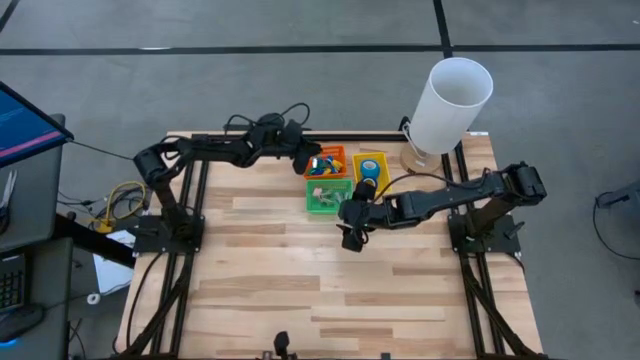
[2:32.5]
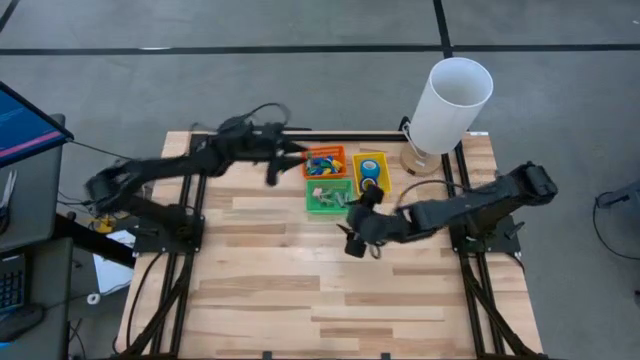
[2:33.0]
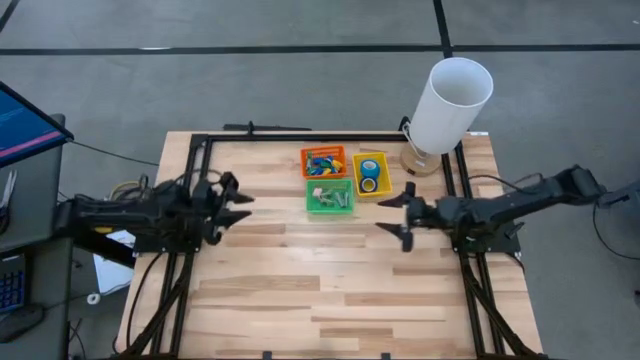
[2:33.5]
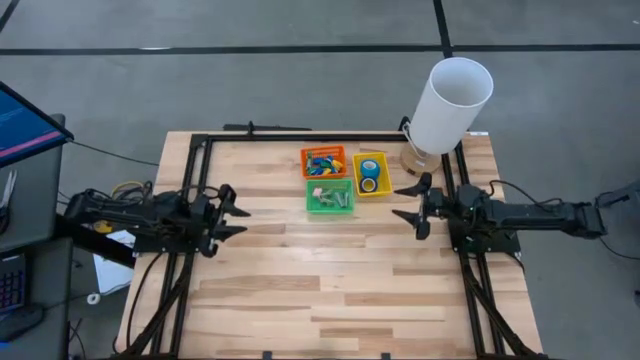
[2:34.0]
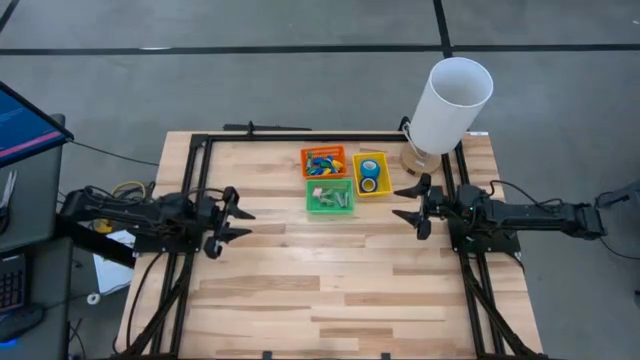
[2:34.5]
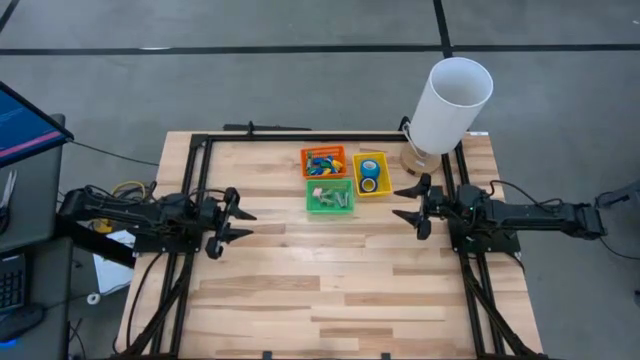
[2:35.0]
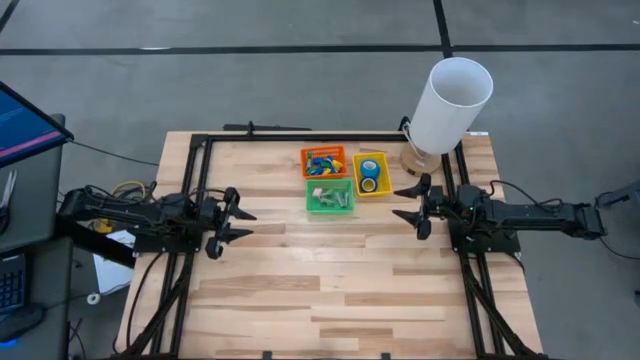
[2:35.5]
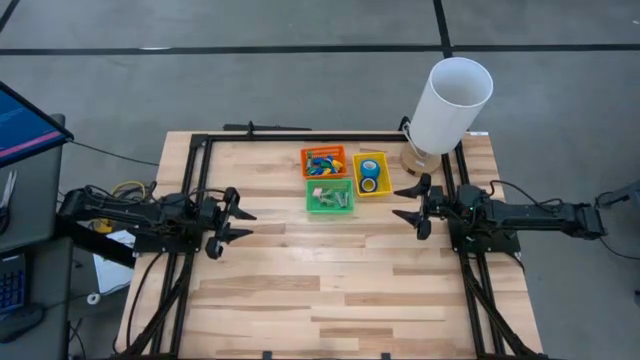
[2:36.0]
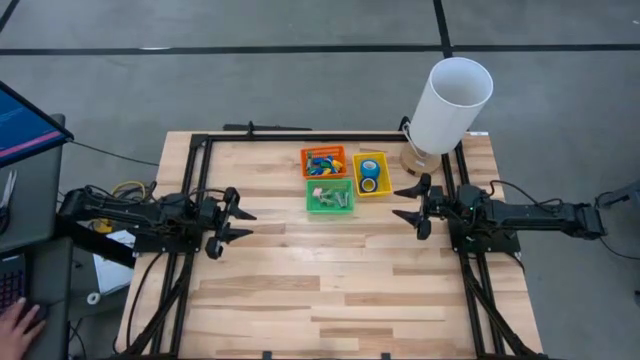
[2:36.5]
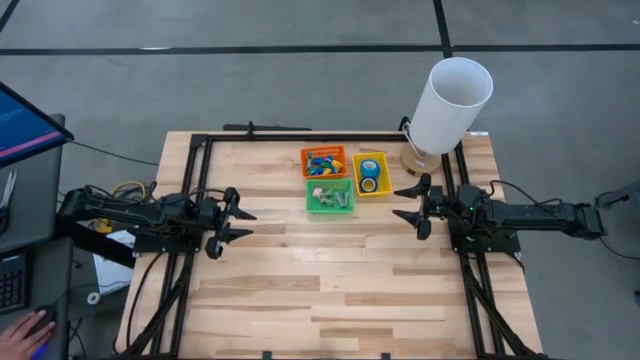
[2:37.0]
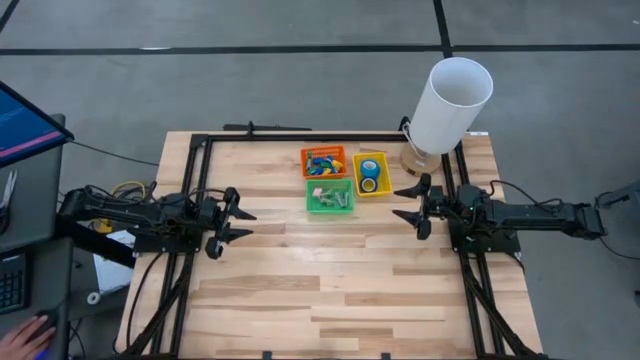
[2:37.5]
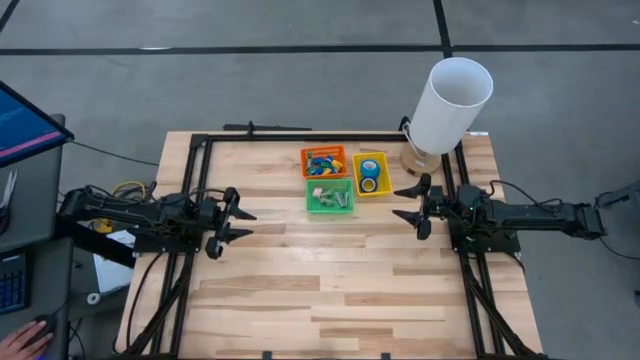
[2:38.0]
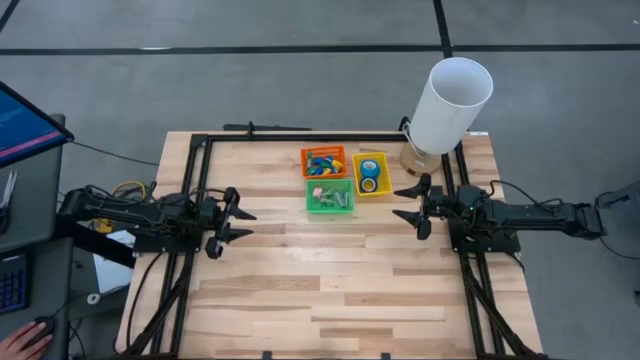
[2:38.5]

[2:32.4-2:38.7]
Task: Pick and place Stapler, Stapler remover, tape
Return to Home Position

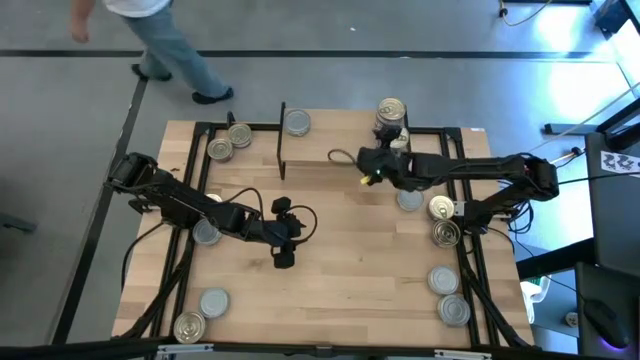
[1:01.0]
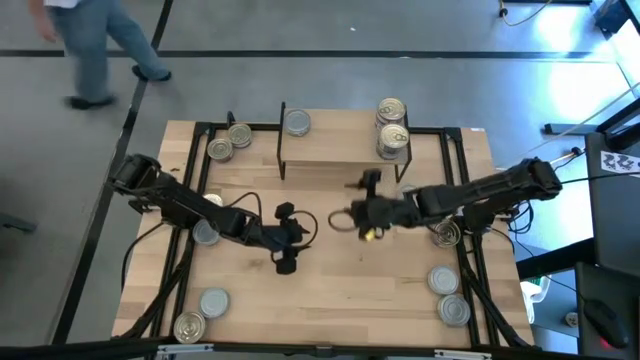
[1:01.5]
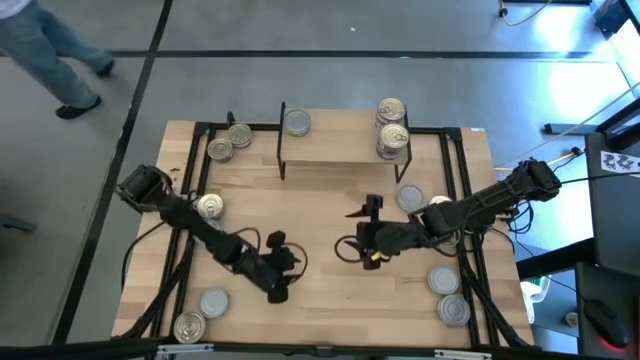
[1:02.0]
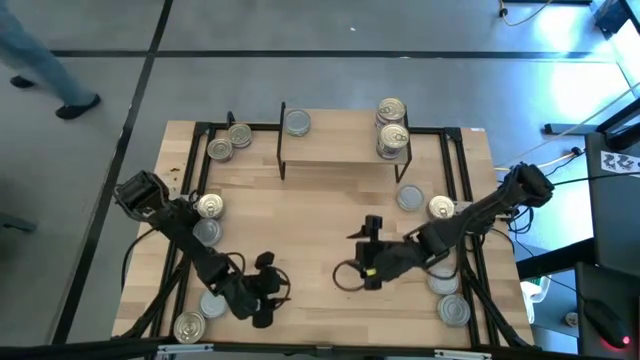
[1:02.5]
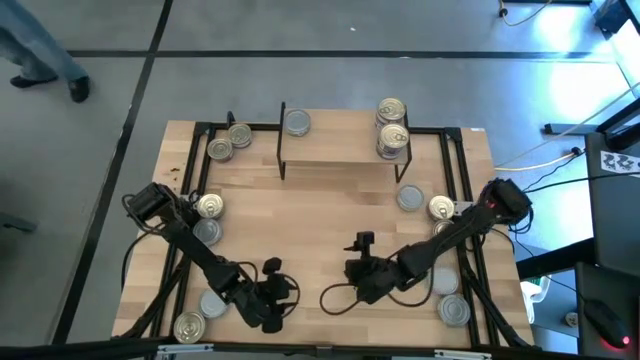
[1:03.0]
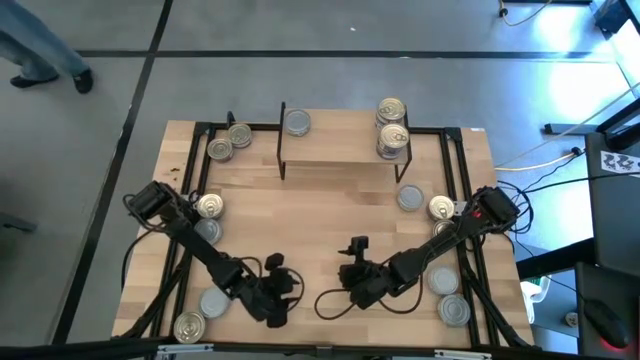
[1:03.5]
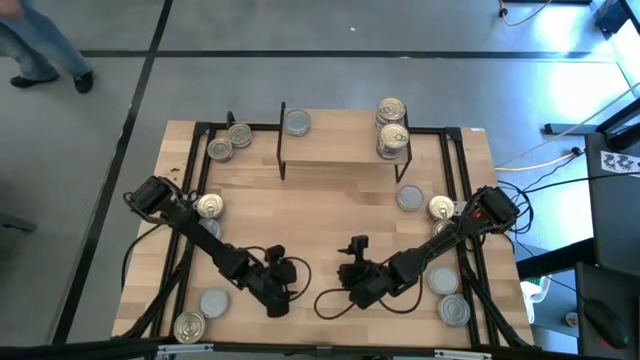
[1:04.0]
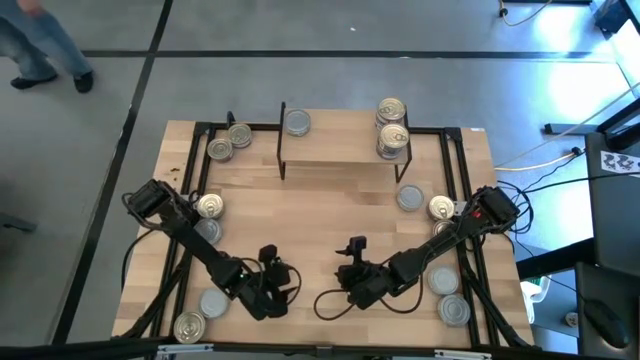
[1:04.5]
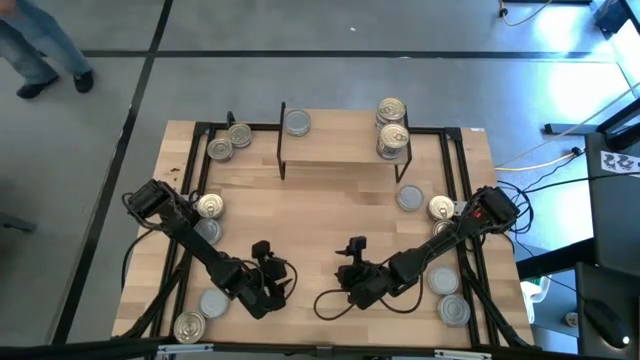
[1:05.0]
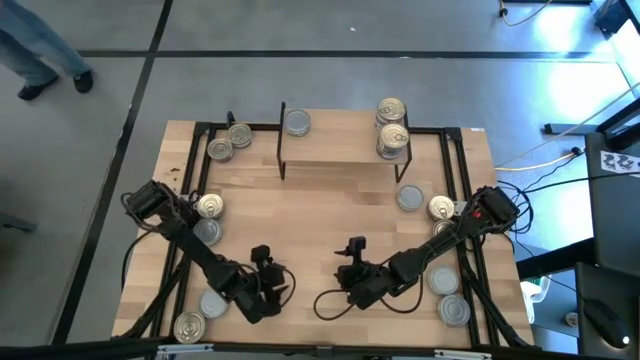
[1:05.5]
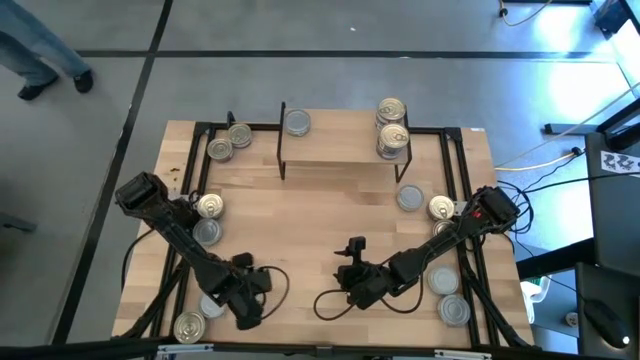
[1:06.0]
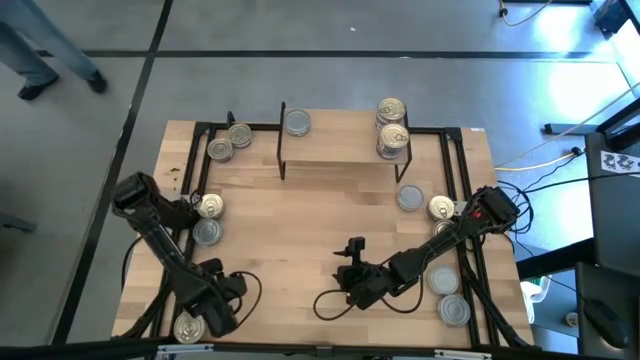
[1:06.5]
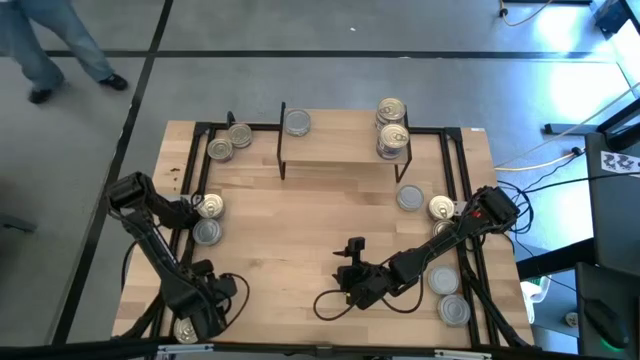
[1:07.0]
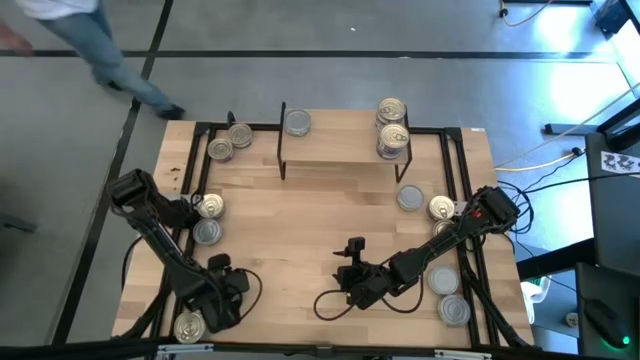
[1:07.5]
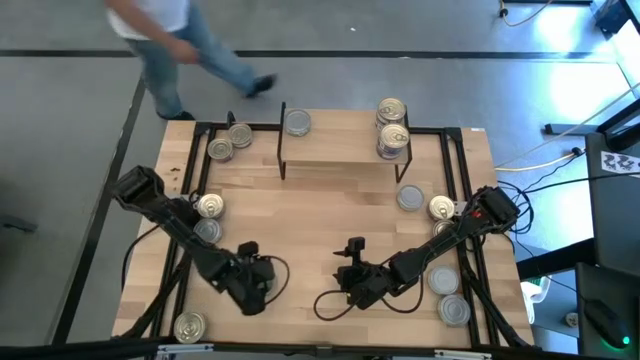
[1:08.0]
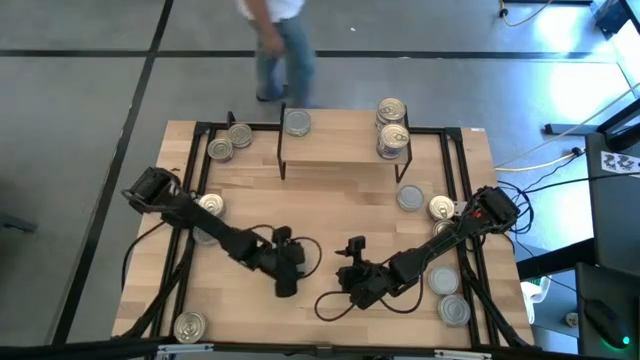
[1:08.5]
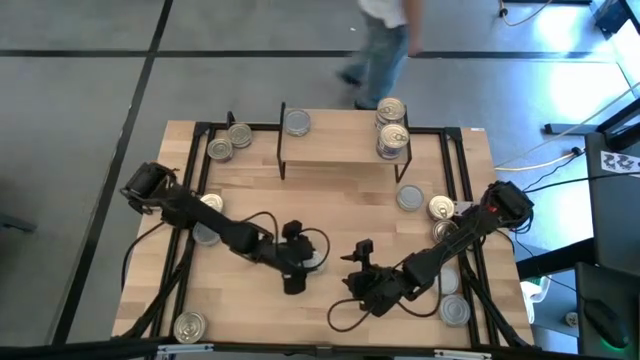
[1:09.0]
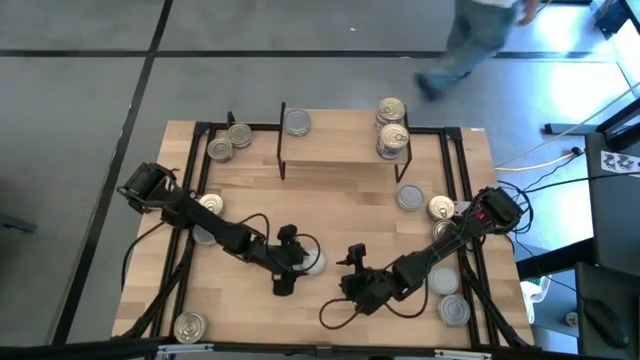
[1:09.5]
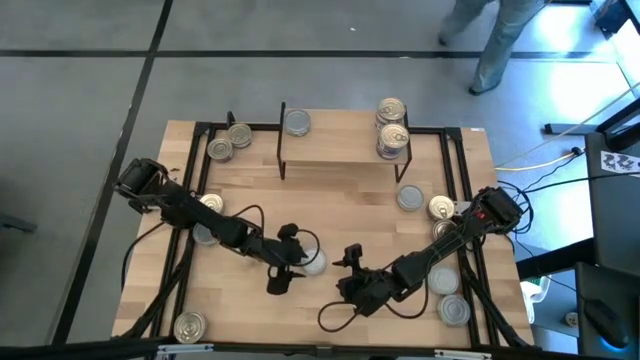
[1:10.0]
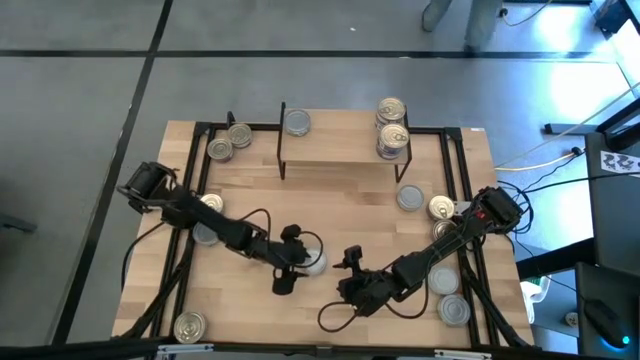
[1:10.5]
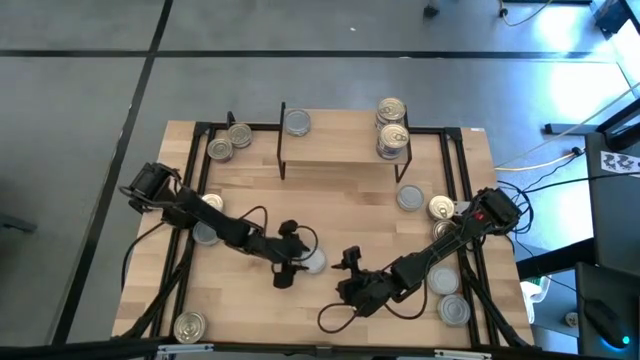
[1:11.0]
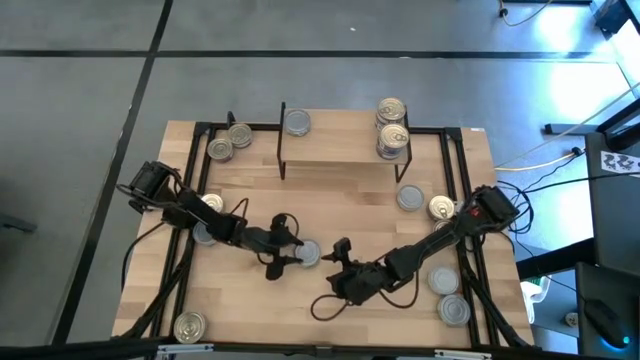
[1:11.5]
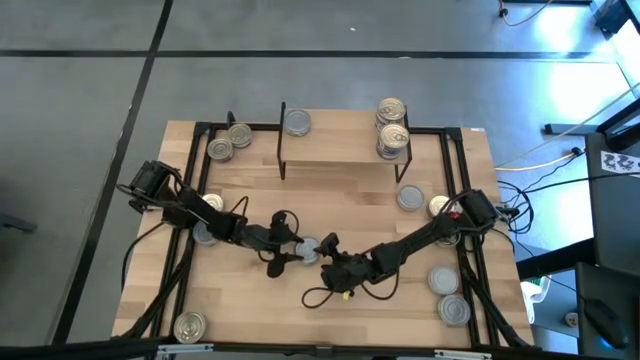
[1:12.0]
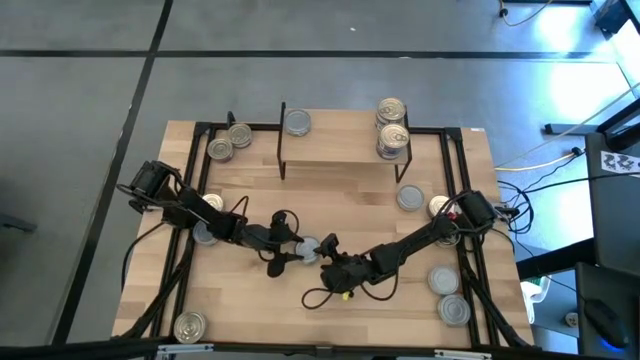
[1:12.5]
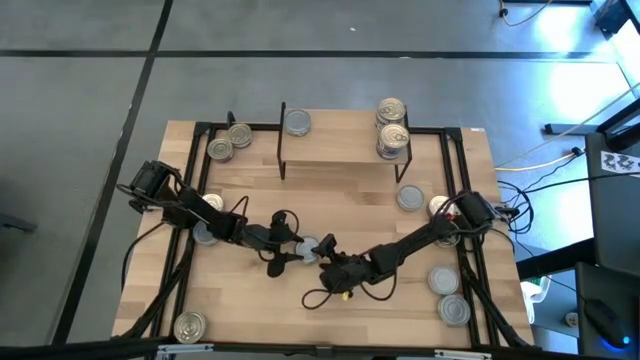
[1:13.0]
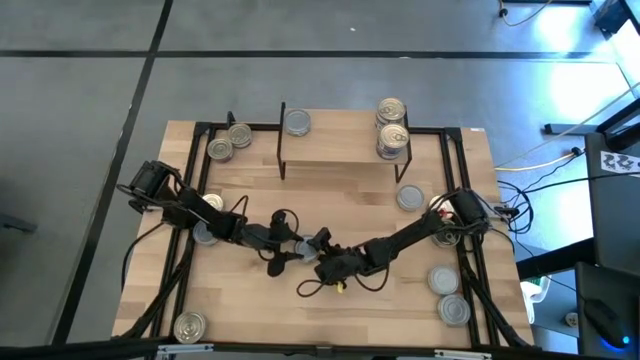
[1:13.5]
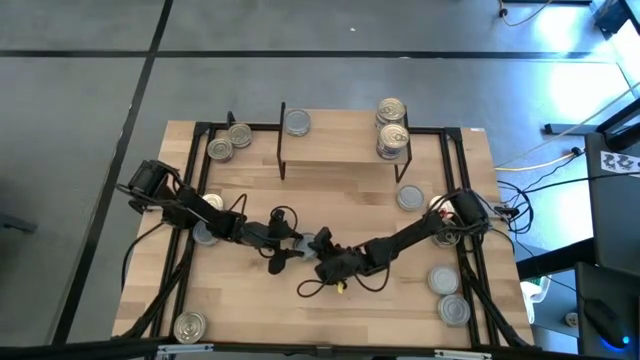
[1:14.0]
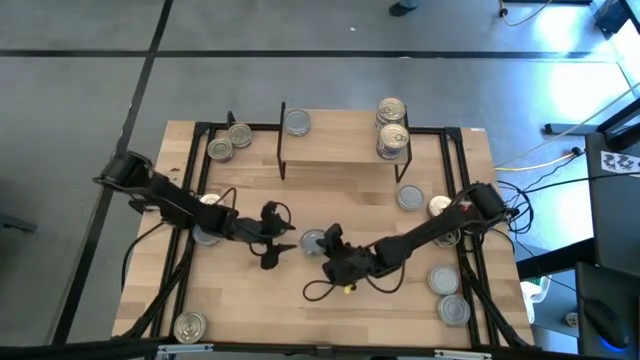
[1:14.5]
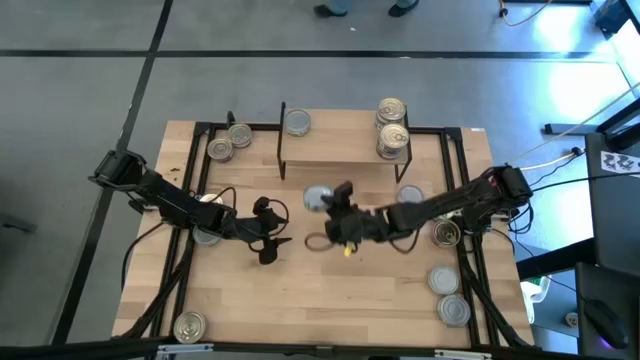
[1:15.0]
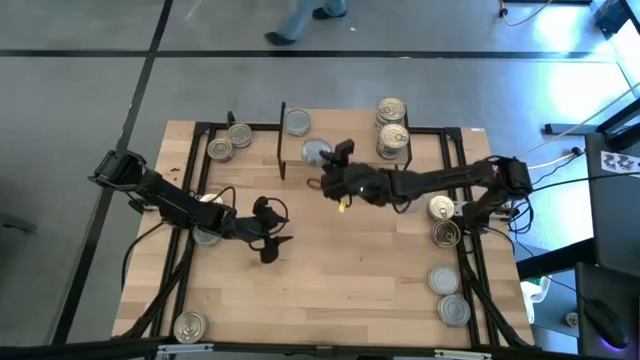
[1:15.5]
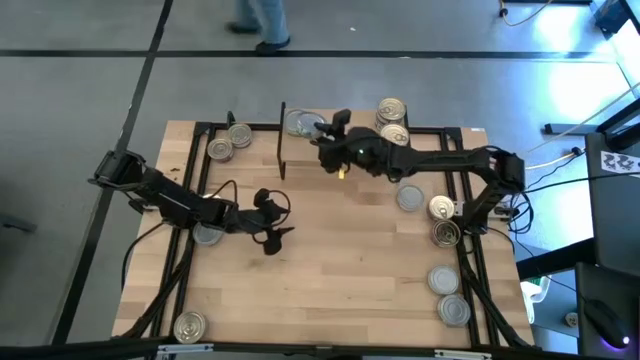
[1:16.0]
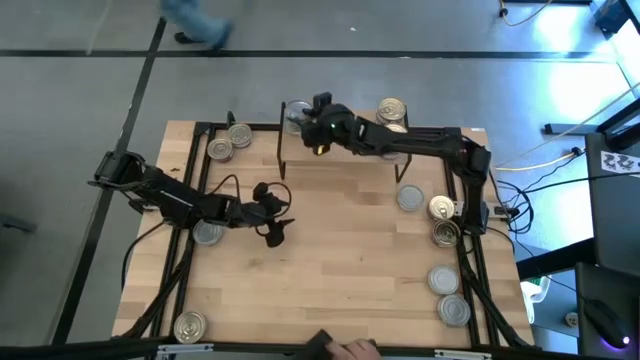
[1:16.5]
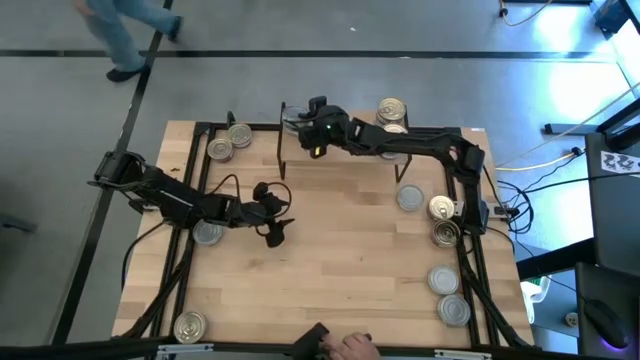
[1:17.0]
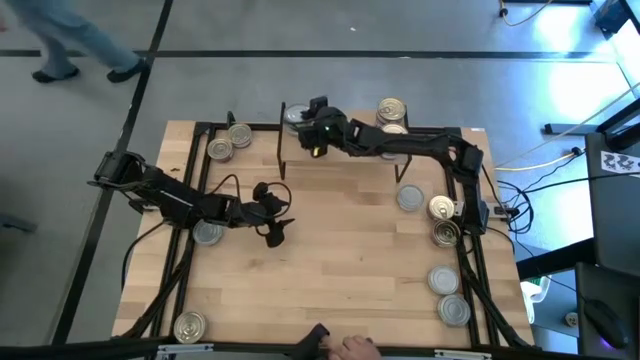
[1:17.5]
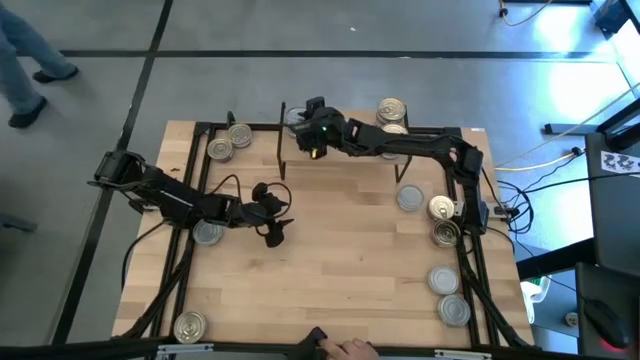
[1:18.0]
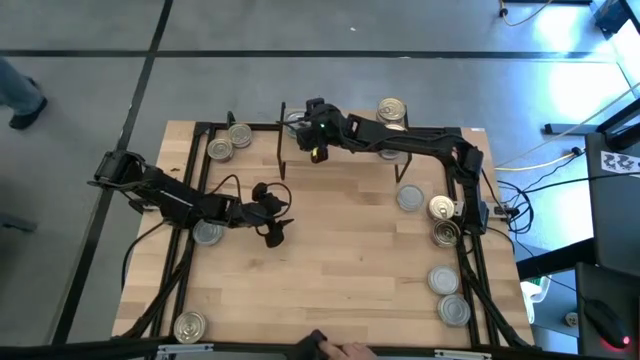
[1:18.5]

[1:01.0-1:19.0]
Task: Stack canned seafood by type on shelf
Stack the green white tuna can on top of the other green white tuna can on the shelf
